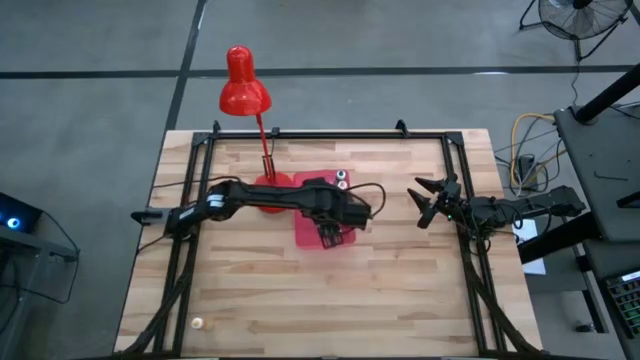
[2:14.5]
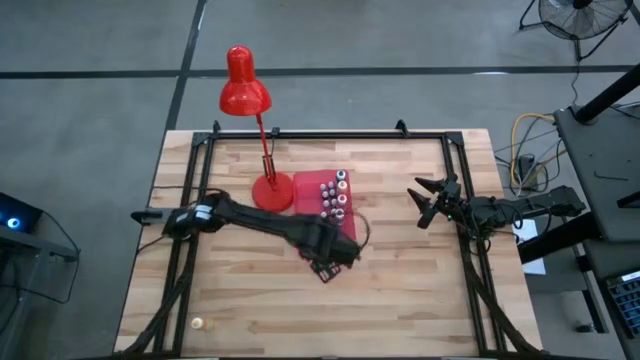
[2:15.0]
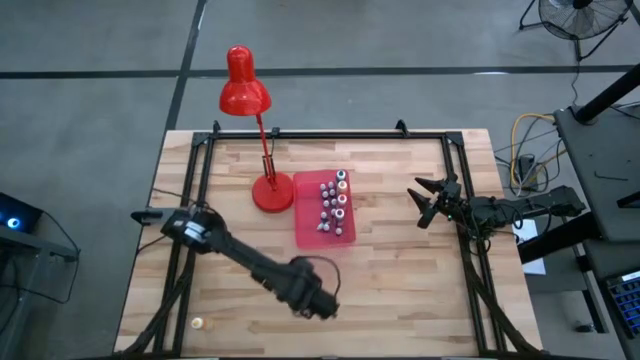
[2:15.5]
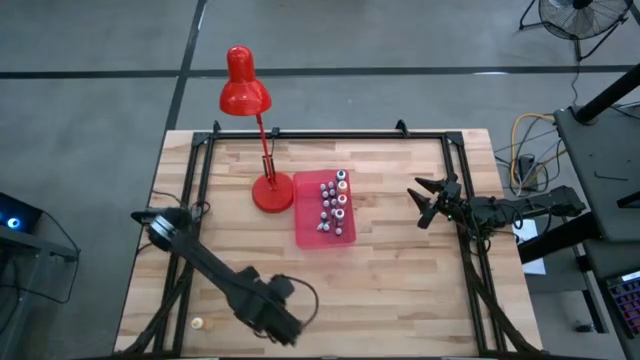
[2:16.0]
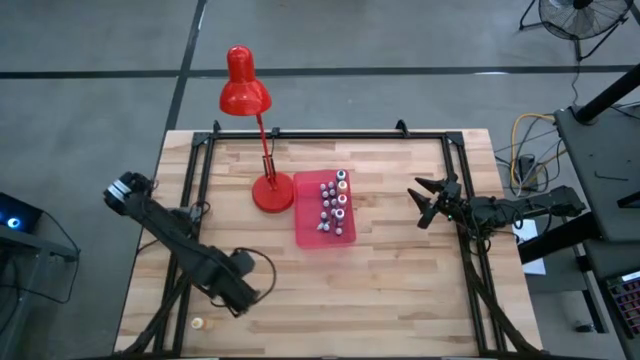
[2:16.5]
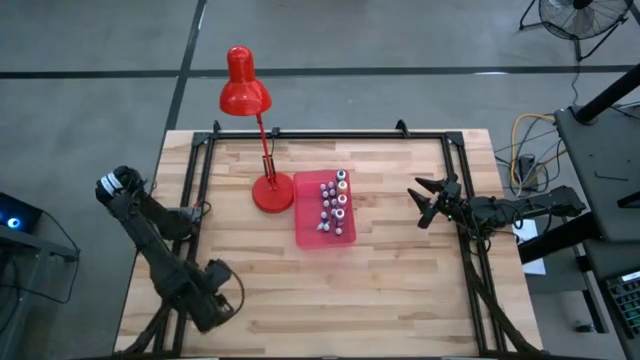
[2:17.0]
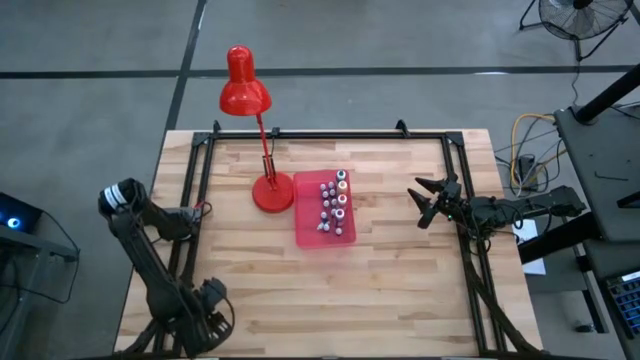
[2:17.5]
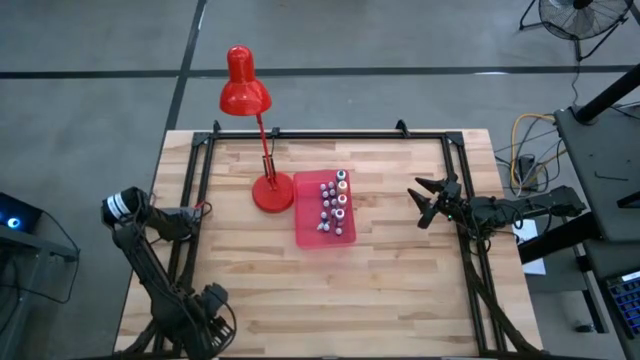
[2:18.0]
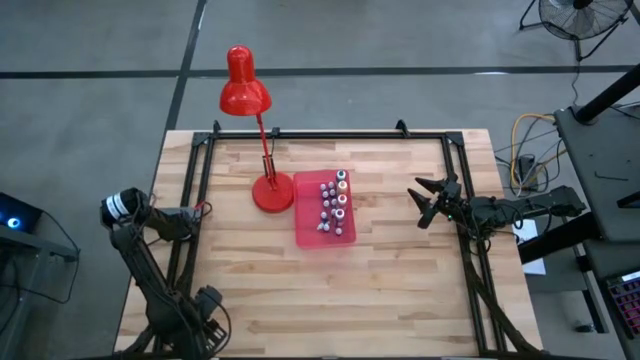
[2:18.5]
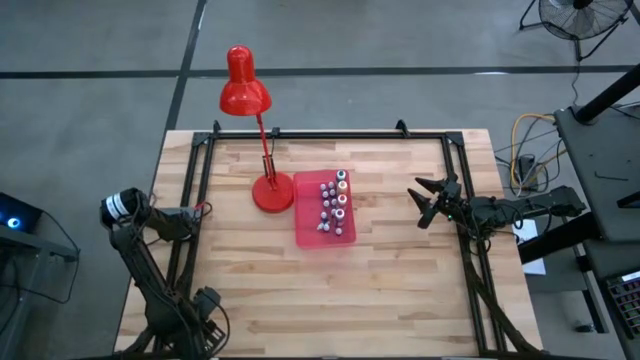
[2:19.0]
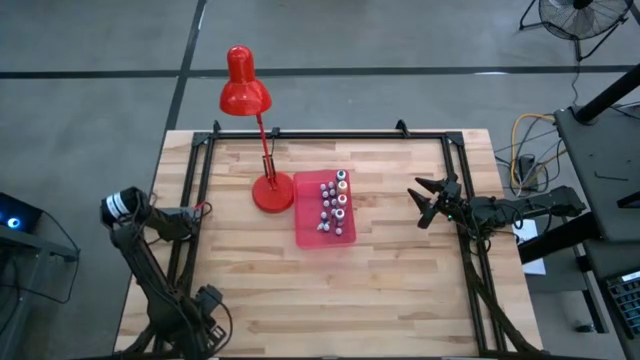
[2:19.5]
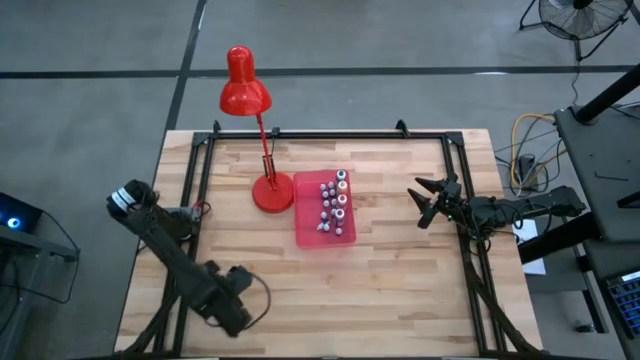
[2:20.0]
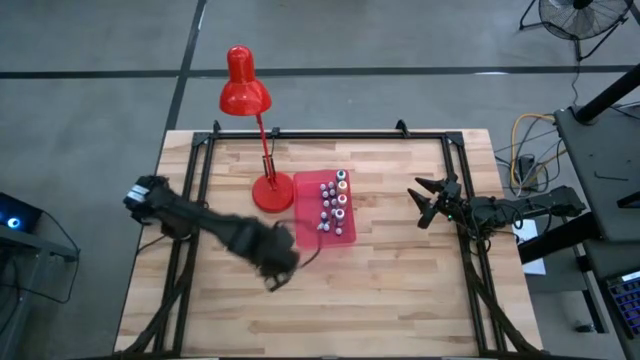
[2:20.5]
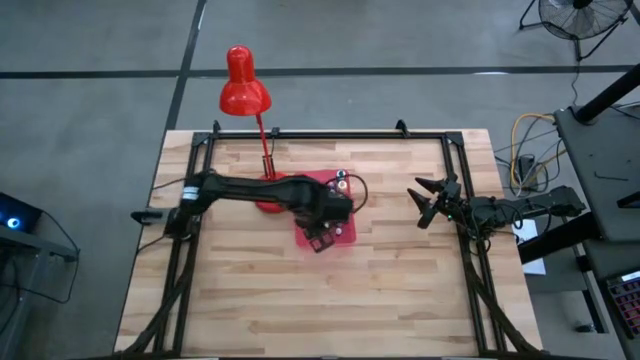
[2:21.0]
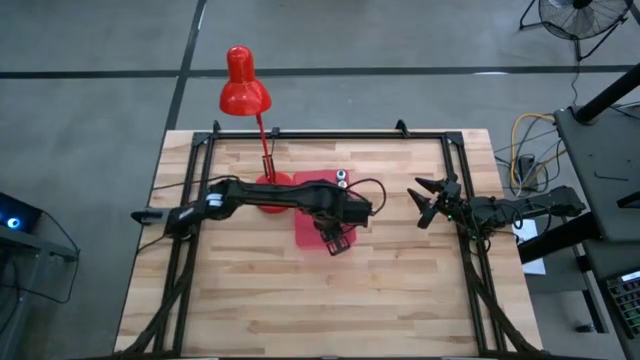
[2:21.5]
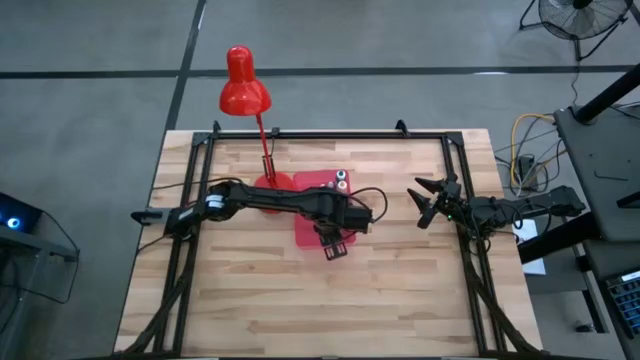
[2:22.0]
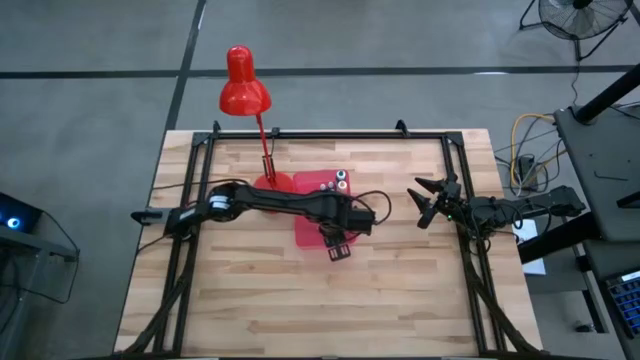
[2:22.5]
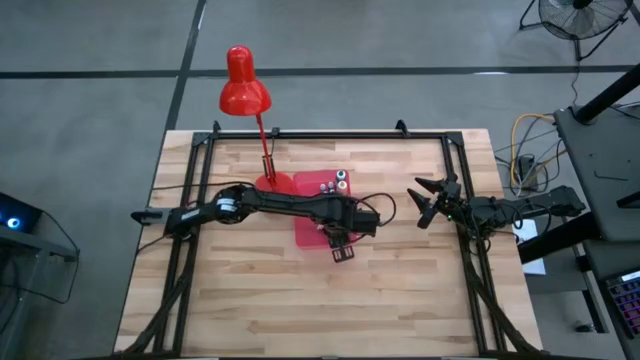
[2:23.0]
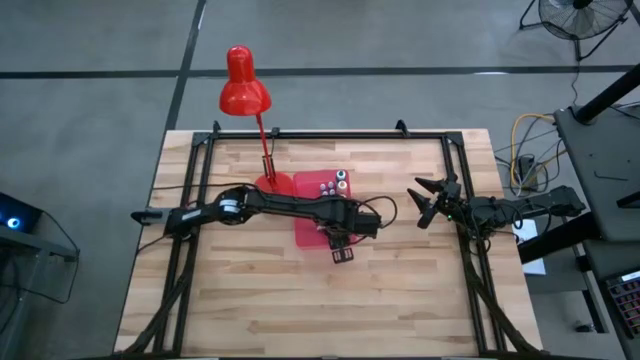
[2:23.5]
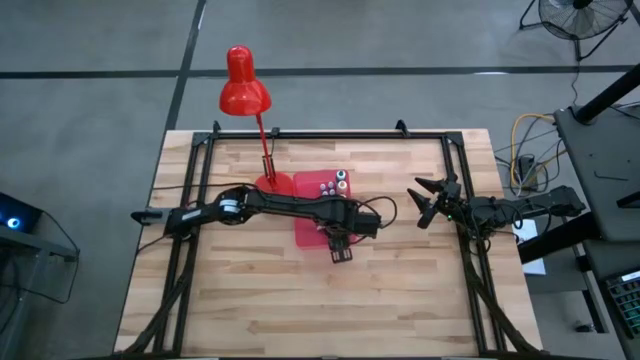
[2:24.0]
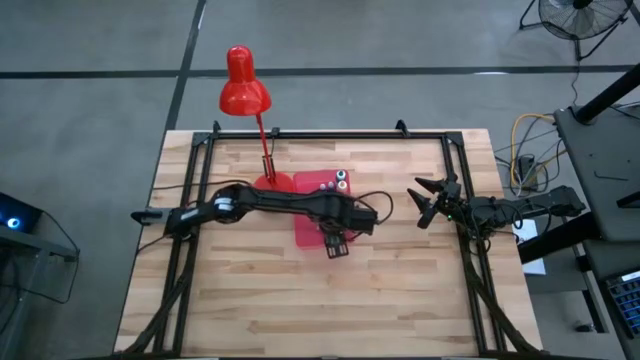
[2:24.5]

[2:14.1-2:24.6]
Task: Pick & Place food coloring
Put the big yellow food coloring bottle into the bin

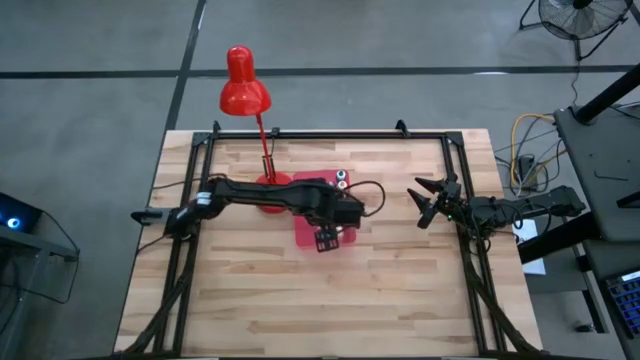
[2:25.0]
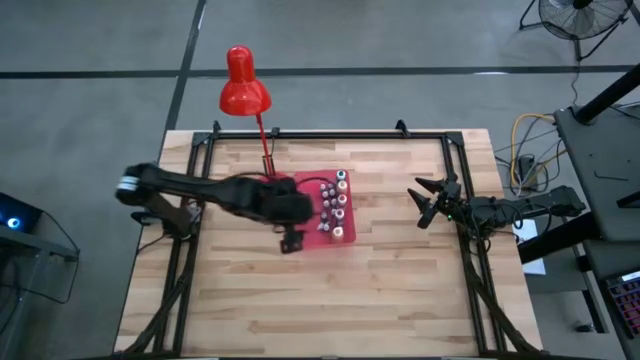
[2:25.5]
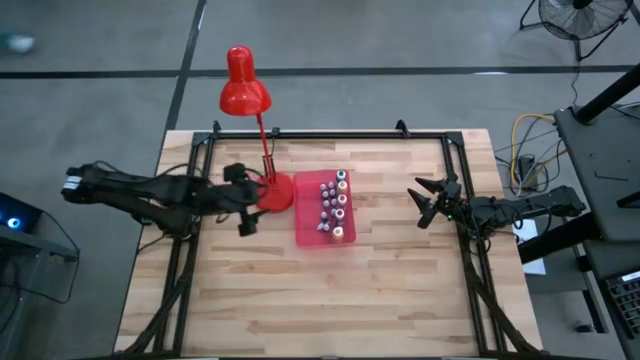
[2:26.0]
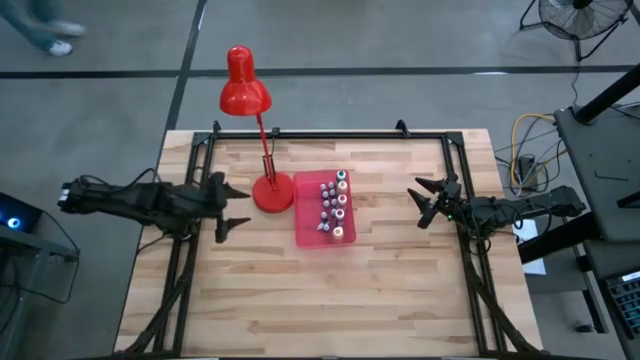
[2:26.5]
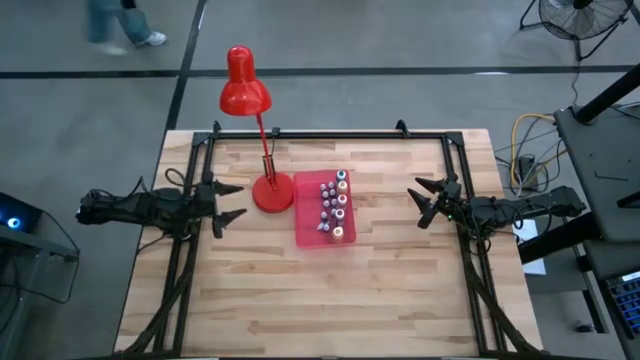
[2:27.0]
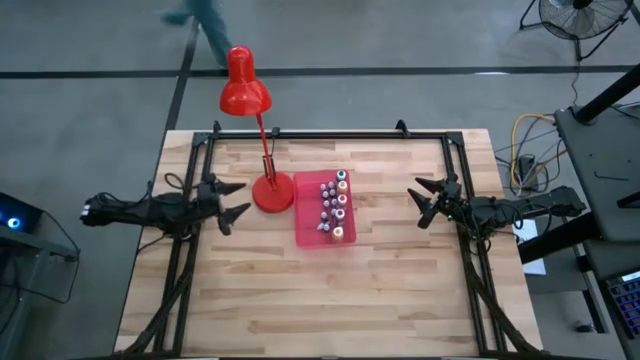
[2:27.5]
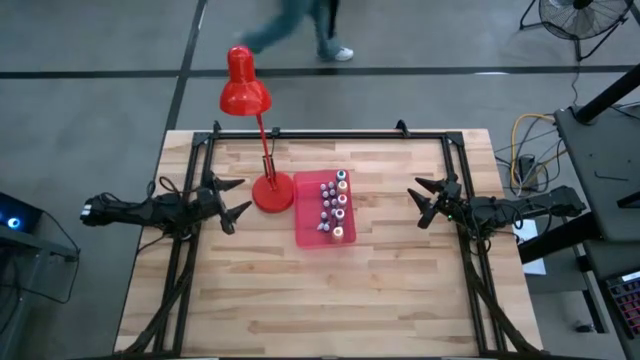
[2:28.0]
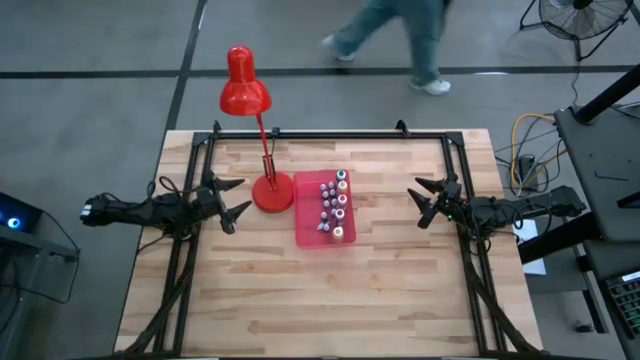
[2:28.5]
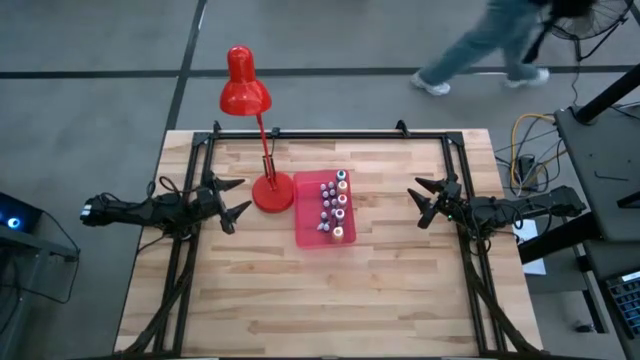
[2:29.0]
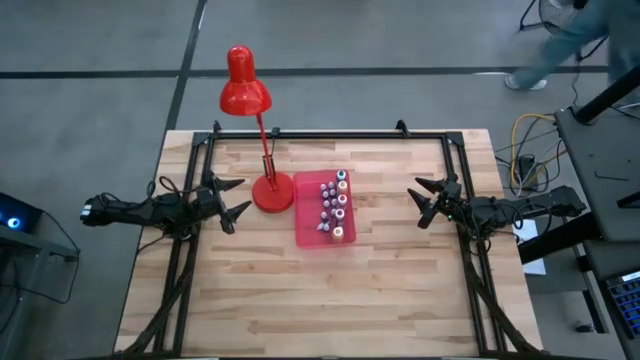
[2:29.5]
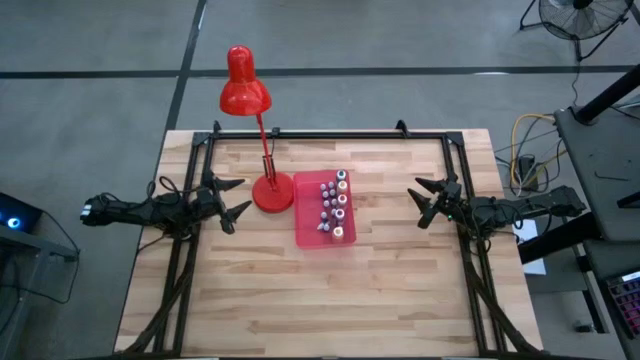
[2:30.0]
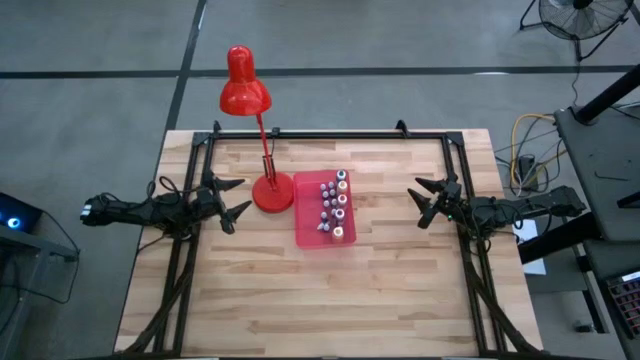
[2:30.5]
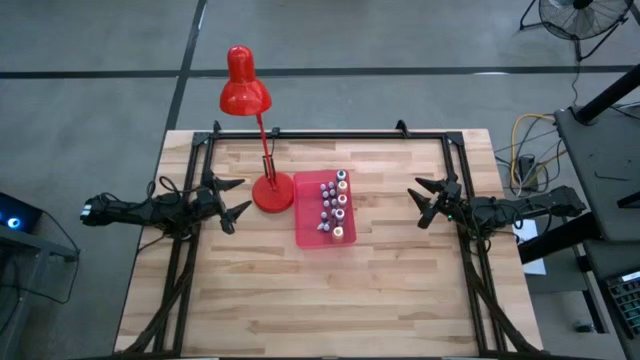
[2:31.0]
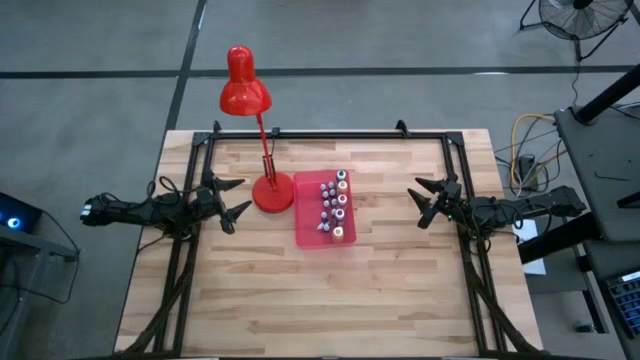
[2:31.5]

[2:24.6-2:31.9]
Return to Home Position

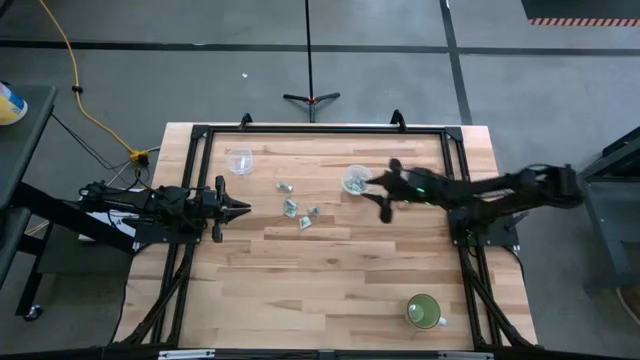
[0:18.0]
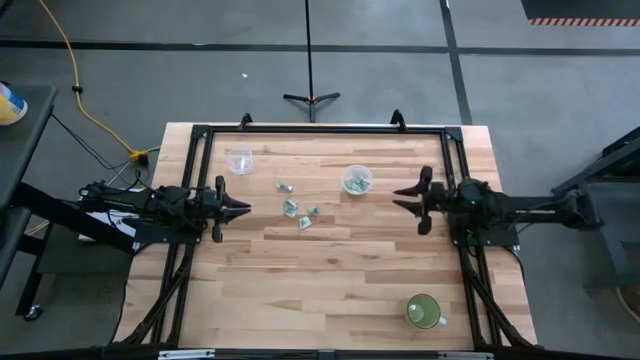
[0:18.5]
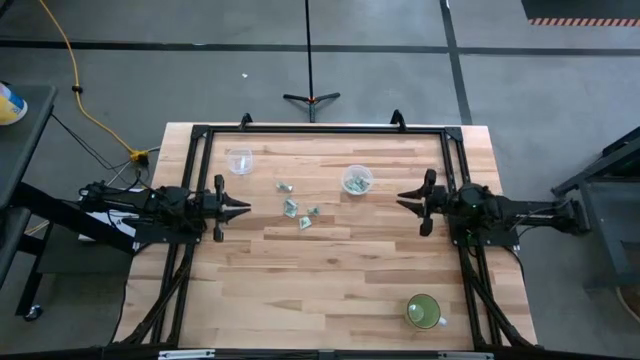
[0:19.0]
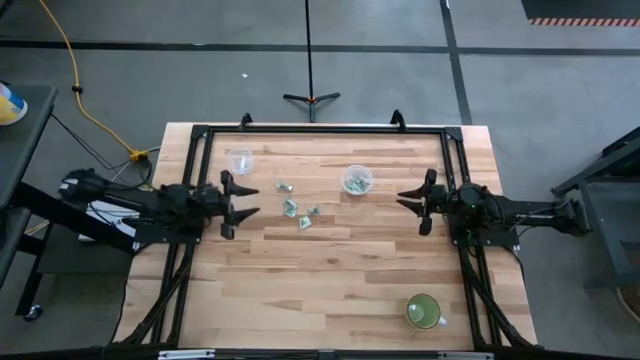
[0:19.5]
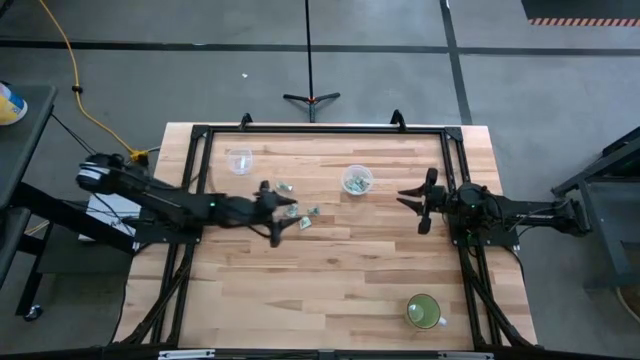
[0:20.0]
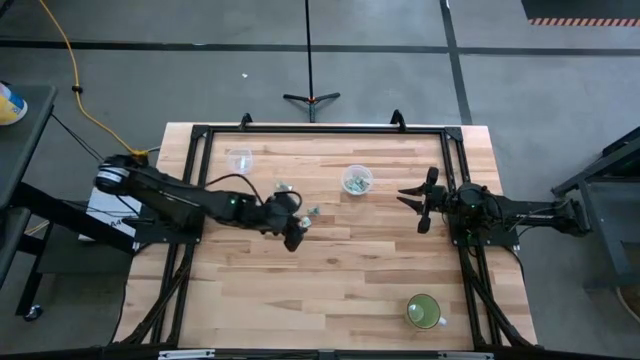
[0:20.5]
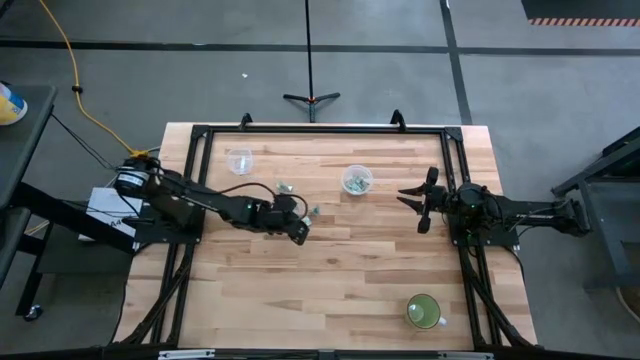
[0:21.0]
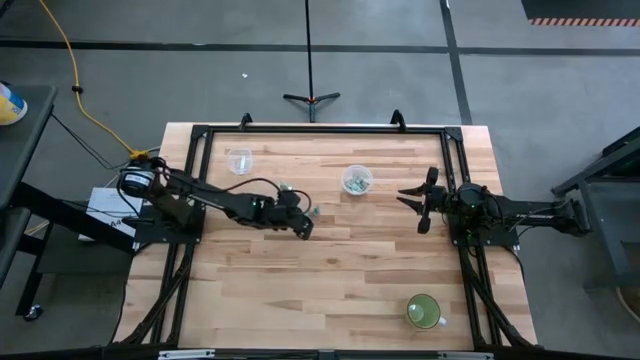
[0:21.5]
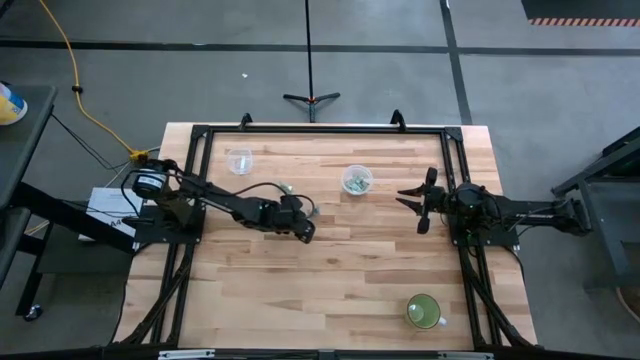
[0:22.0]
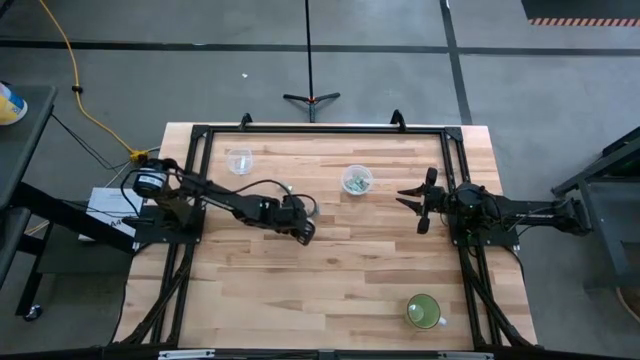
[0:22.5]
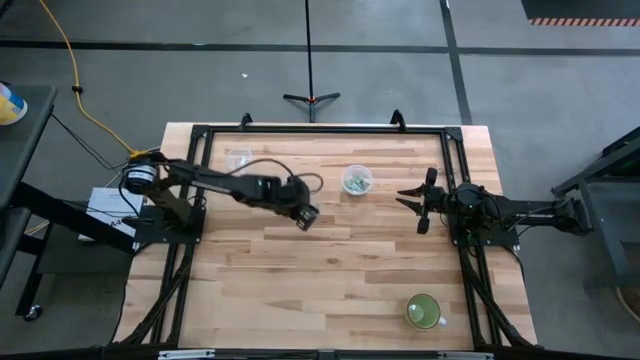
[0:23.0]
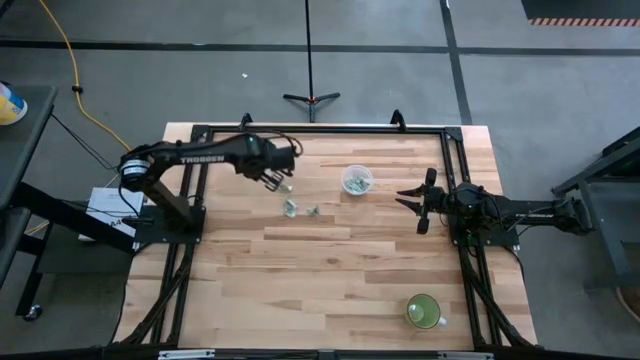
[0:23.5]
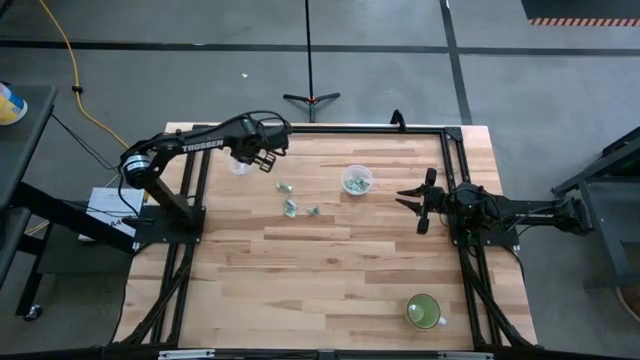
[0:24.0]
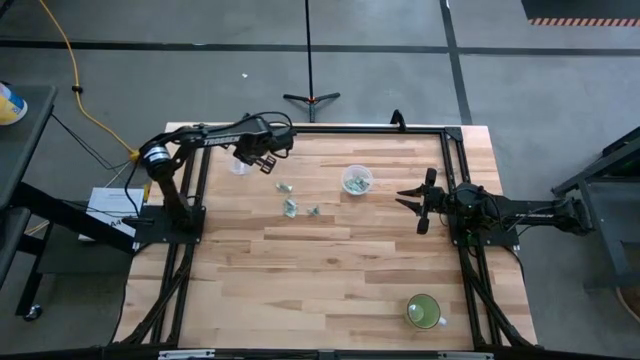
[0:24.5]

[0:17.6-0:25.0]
Task: Pick and place Stevia / Truvia into bins
Put the stevia packet into the top transparent container
